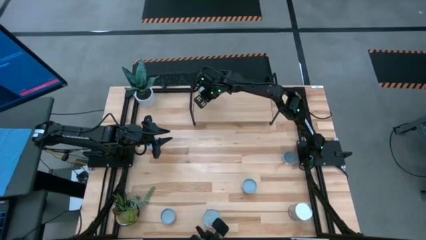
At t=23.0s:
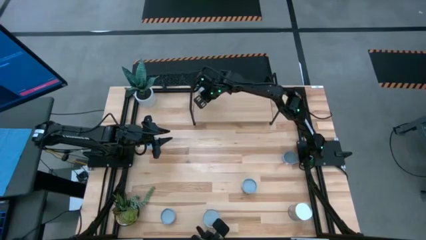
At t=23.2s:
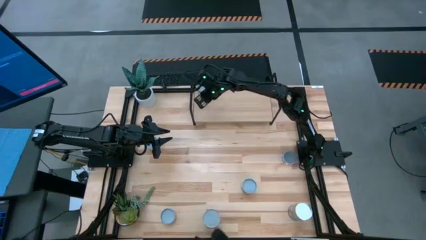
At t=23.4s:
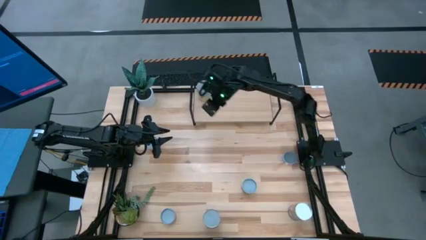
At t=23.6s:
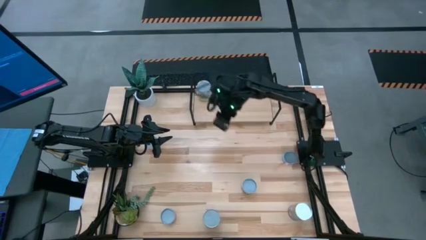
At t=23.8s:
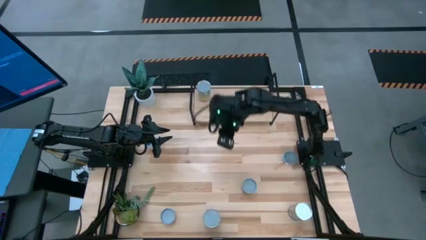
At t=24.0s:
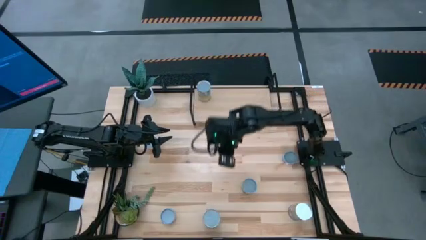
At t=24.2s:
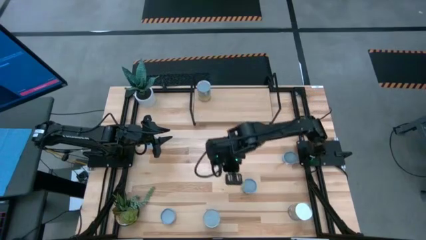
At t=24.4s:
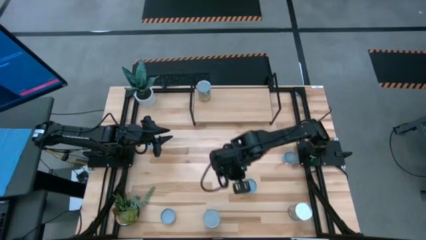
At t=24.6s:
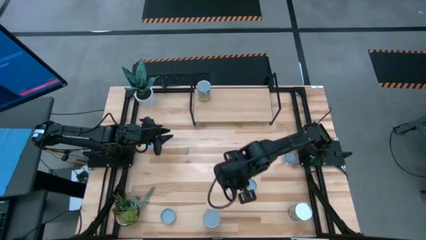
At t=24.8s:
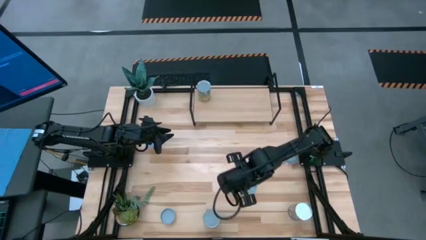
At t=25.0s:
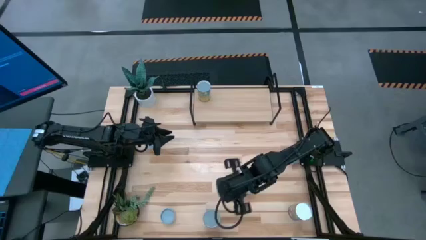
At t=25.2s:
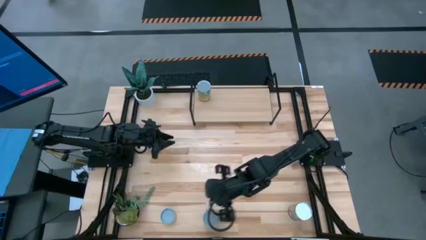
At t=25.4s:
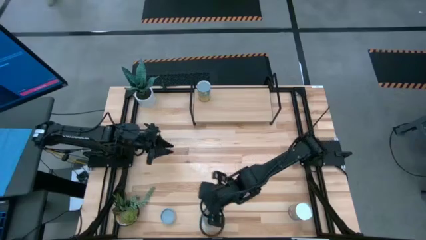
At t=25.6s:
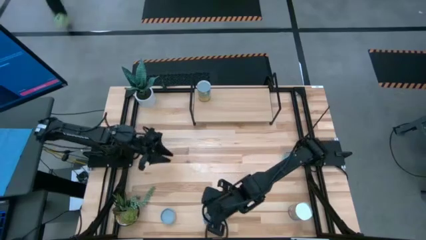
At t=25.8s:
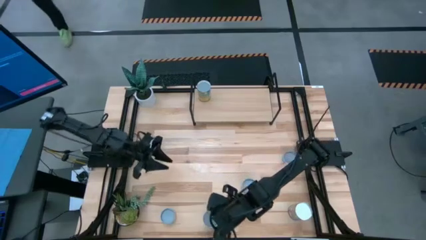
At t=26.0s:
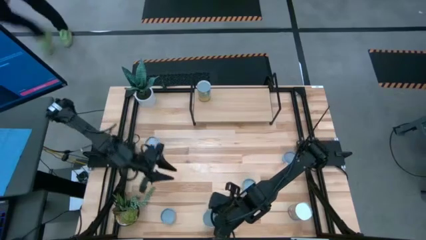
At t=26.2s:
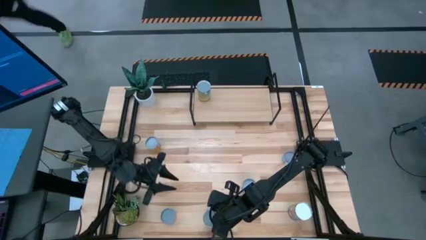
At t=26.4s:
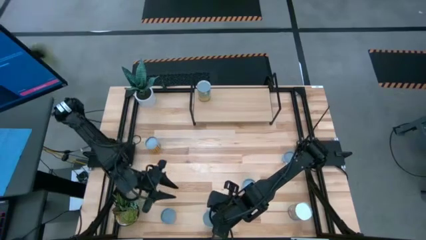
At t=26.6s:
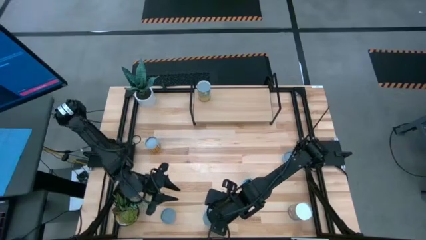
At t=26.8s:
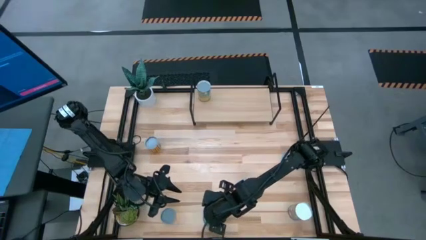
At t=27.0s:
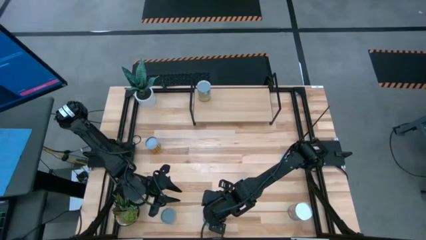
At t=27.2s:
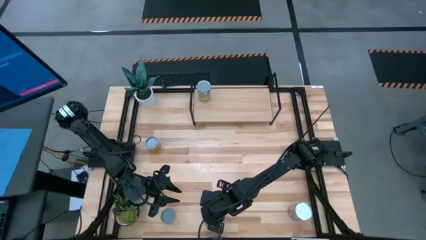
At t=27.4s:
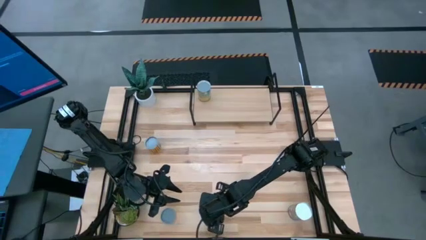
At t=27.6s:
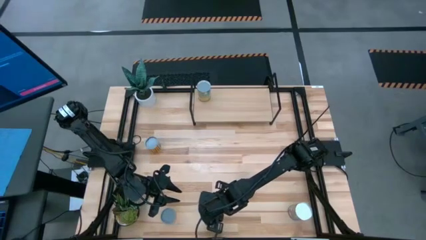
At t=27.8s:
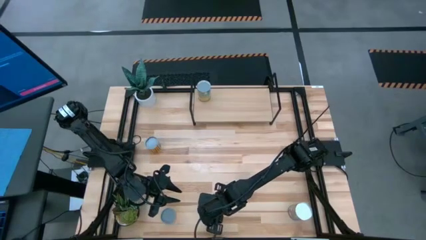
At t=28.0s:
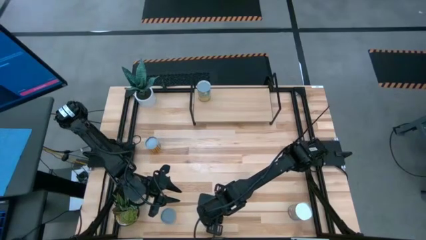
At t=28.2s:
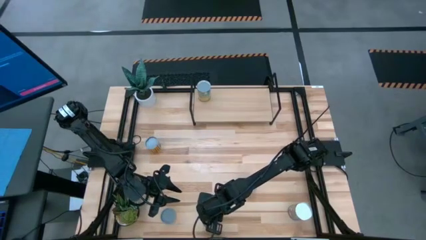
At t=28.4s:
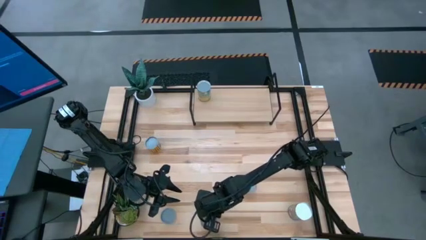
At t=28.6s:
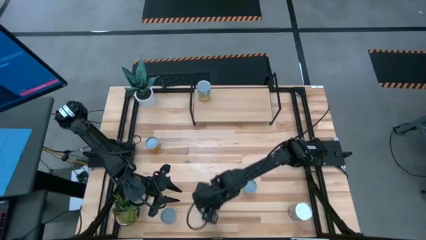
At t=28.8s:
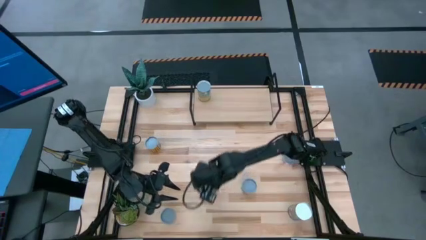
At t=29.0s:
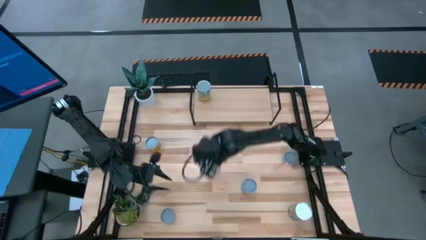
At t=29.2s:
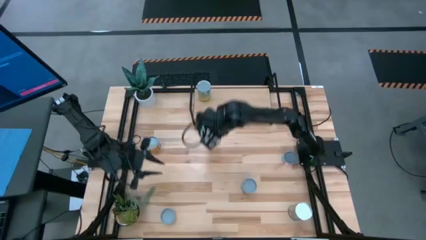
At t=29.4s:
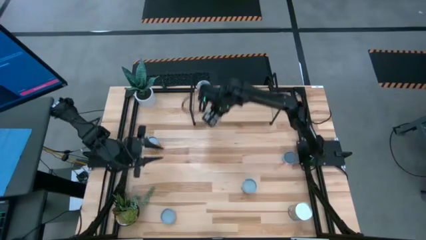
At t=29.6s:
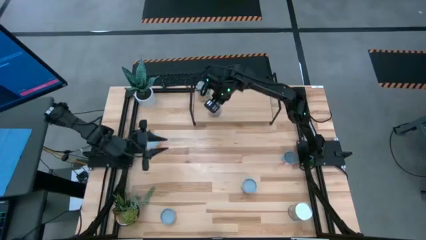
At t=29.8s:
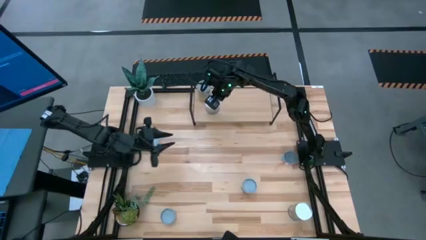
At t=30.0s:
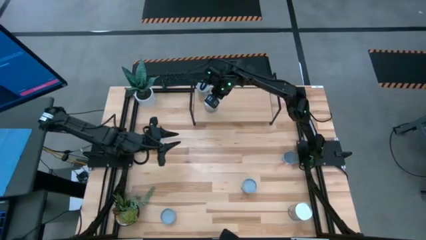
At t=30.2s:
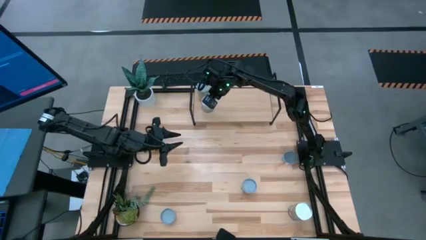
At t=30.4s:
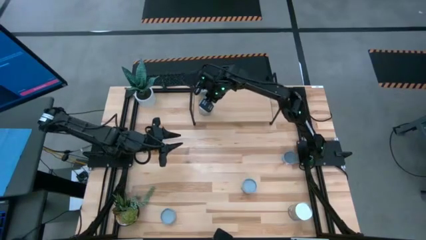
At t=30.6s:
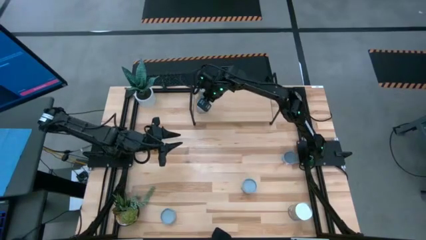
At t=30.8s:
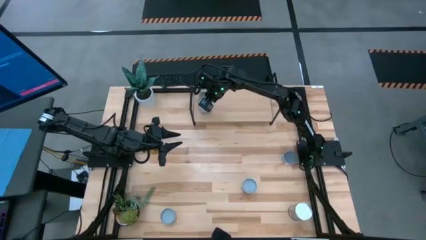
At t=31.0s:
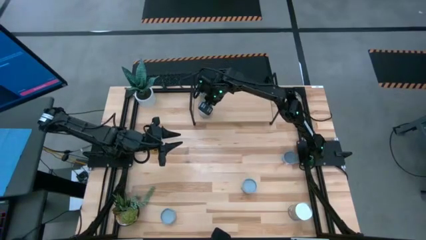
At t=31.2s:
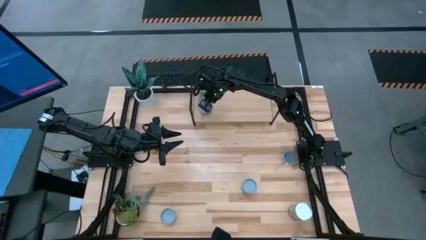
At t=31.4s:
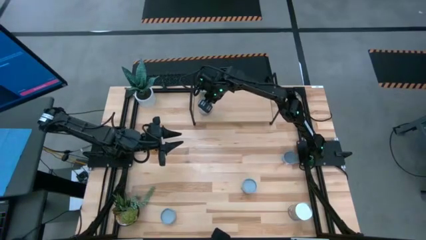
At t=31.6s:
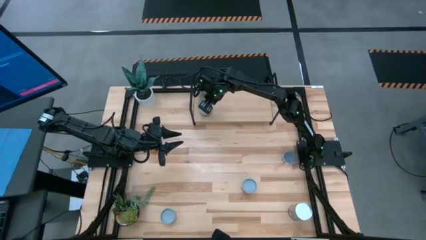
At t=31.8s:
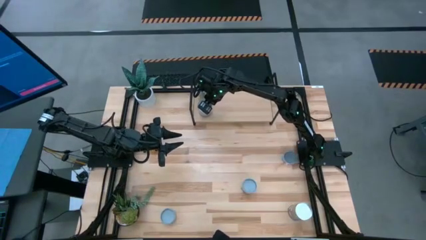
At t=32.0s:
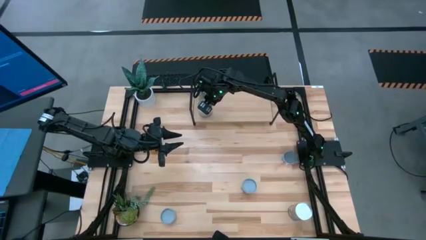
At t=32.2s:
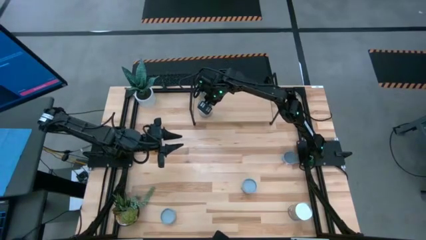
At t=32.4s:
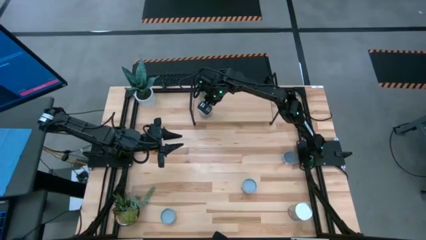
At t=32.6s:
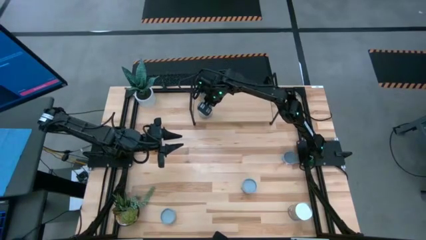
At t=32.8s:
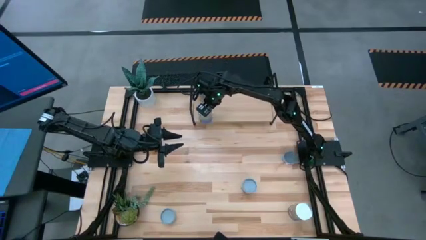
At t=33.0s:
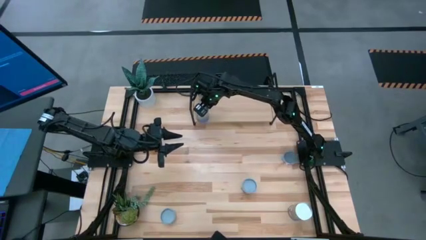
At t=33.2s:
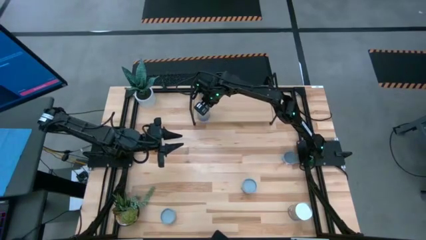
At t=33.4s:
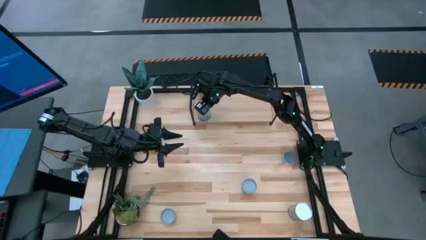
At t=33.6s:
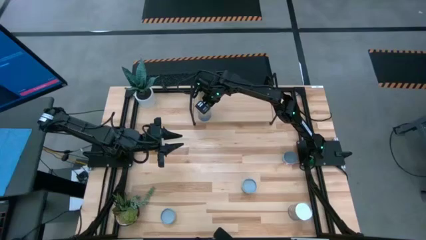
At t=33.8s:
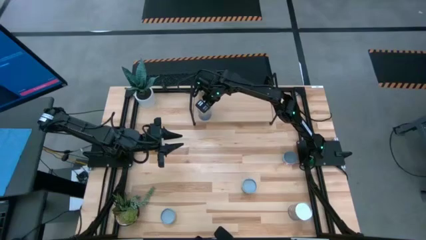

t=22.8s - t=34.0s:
Task: Pick and place cans onto a shelf
Put the canned peas on the shelf

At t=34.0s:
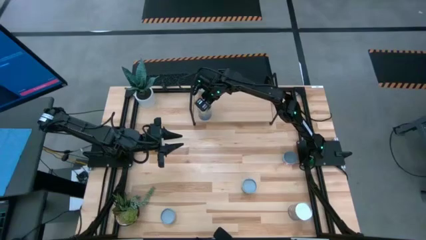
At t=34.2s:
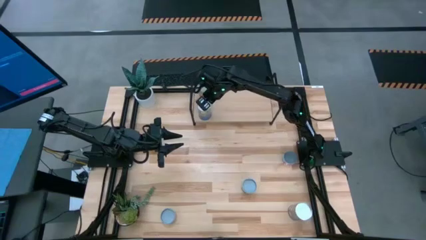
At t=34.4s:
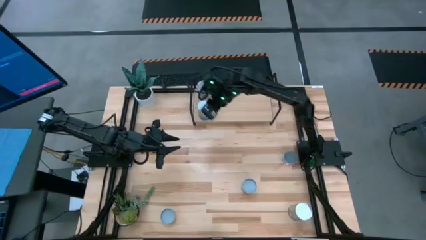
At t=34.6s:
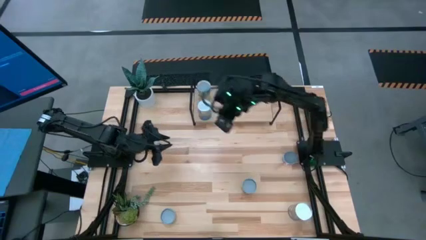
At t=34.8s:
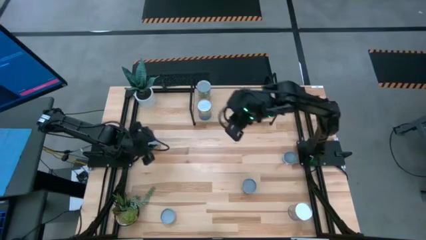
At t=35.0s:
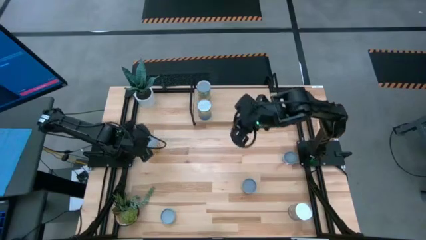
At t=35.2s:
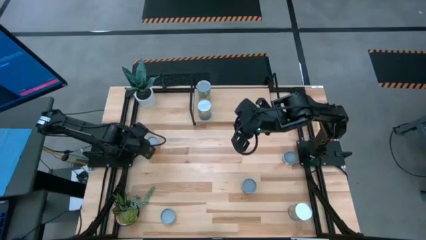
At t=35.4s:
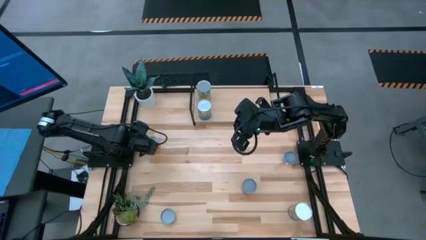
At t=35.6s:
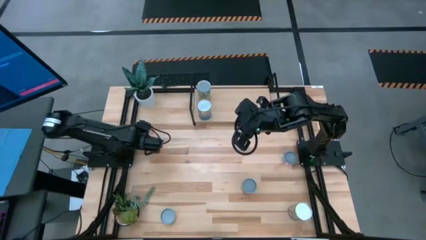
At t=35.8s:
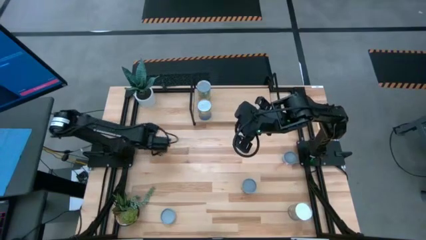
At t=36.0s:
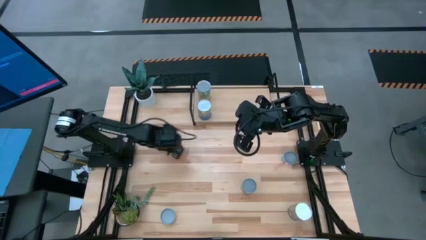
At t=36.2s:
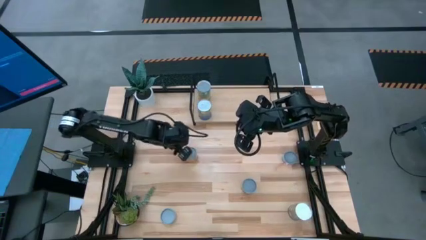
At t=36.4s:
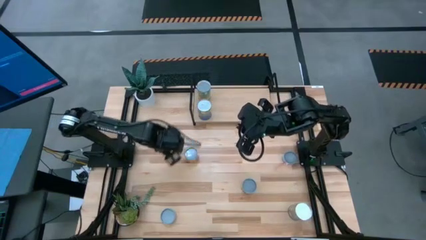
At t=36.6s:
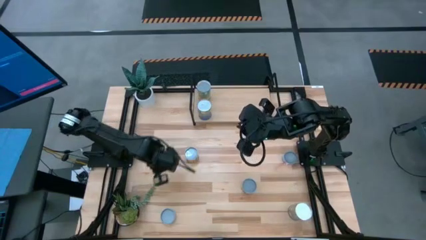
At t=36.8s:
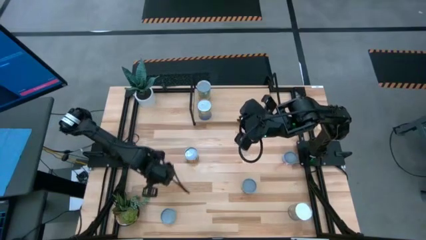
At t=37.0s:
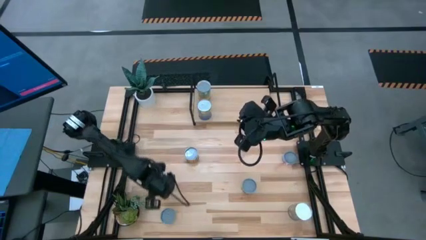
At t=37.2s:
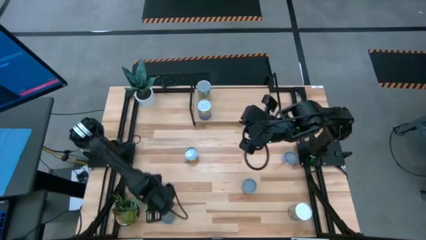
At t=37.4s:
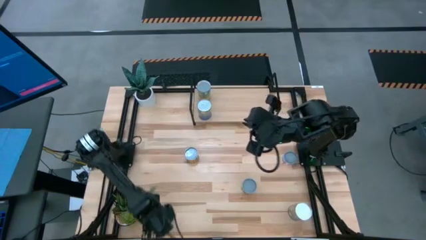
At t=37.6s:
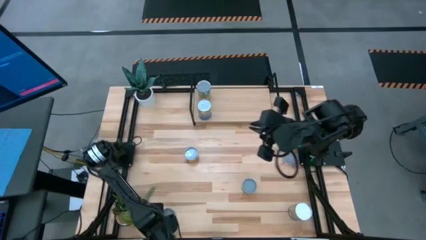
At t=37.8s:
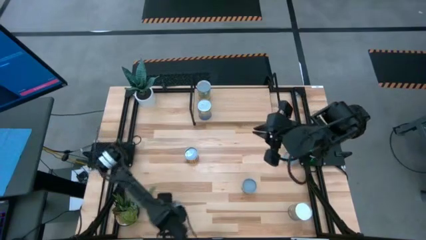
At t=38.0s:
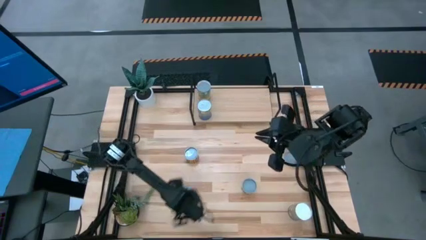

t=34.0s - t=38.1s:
Move the canned goods to the center of the table

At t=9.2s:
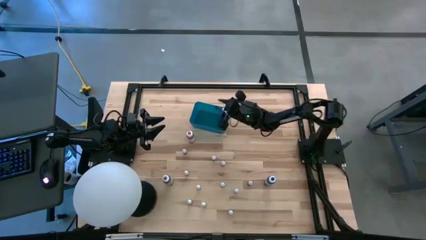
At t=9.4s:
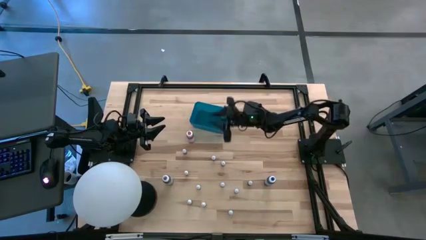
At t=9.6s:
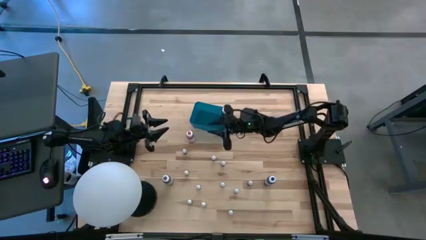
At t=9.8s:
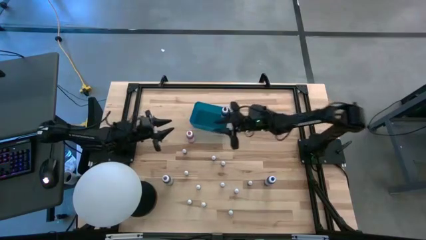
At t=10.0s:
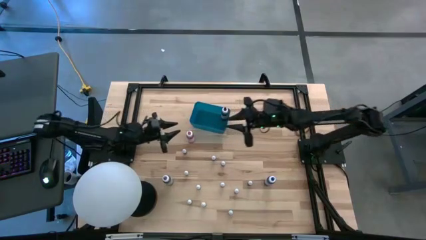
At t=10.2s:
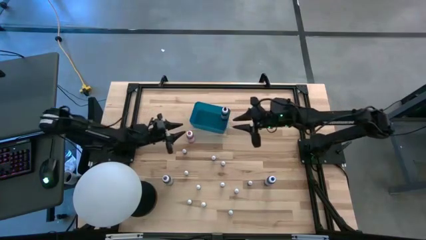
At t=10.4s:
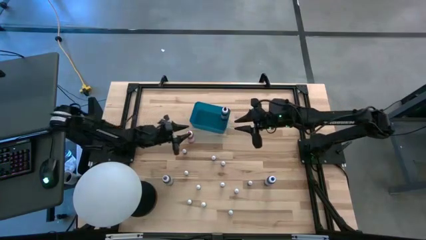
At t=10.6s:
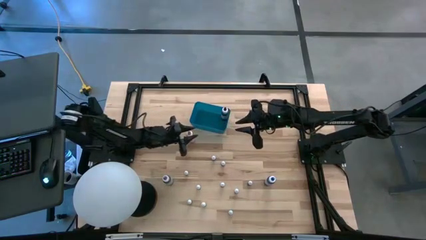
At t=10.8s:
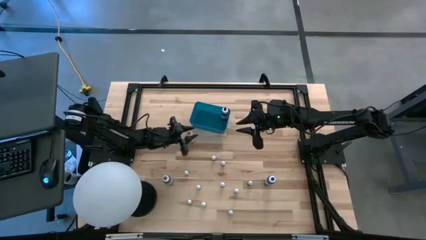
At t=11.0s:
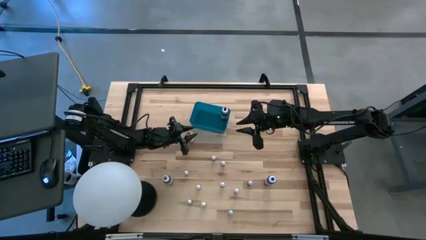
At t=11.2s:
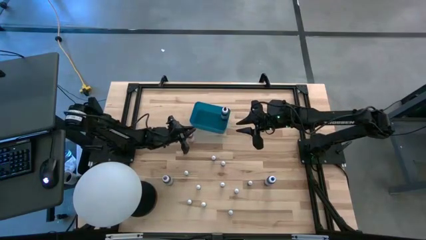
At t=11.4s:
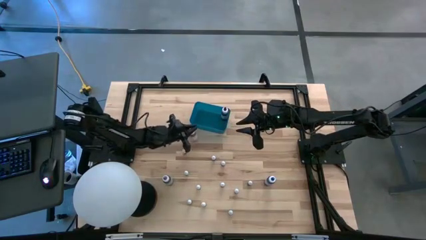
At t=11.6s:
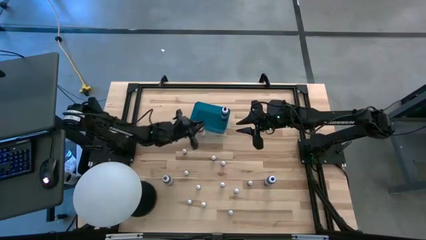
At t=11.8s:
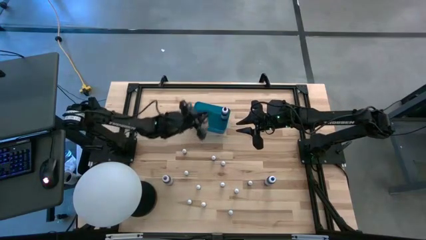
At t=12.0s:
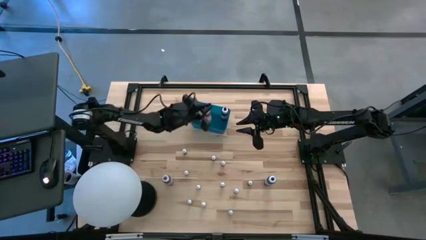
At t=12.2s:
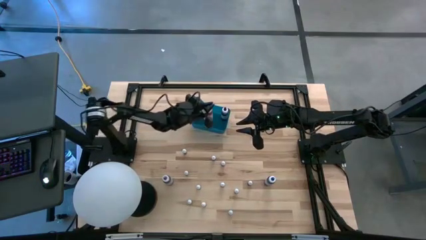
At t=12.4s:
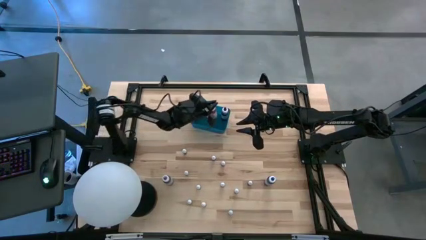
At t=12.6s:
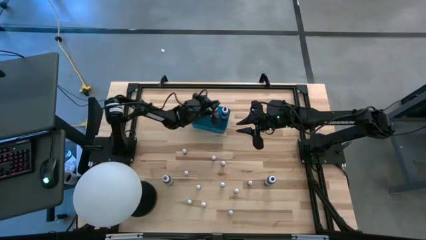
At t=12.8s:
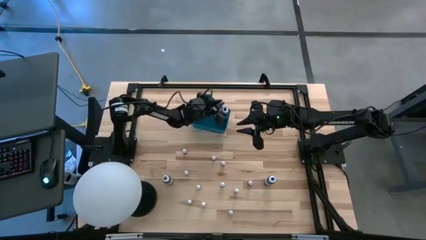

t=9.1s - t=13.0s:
Task: Pick & Place food coloring
Put the pink food coloring bottle into the blue bin
